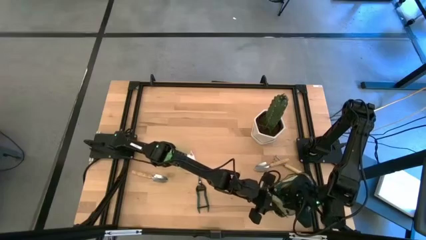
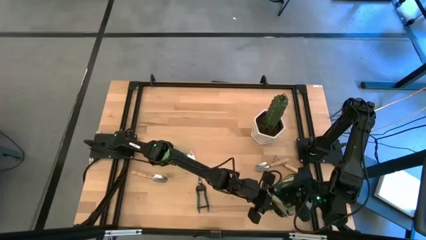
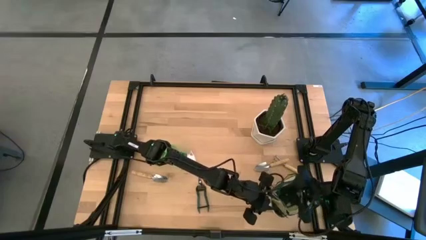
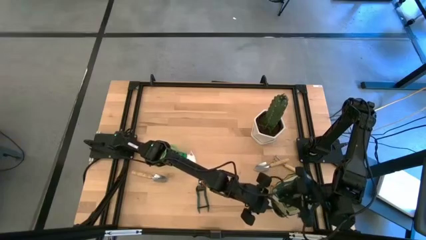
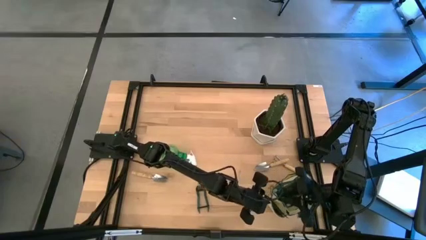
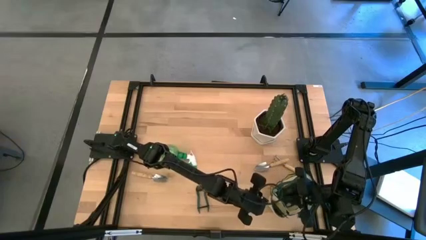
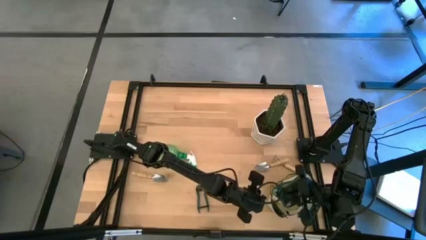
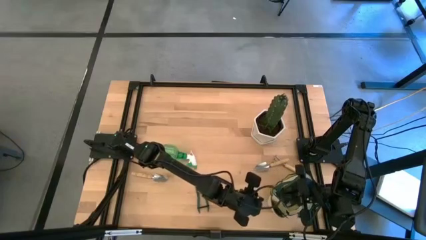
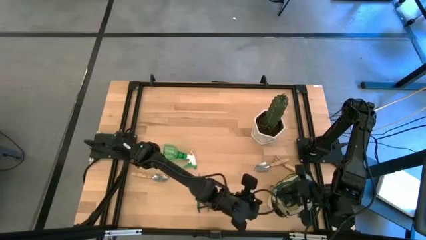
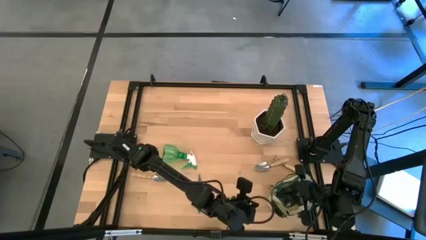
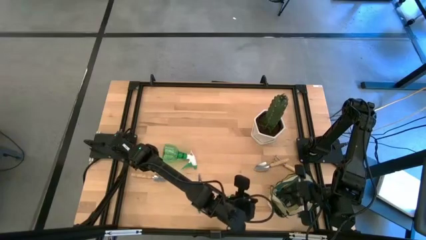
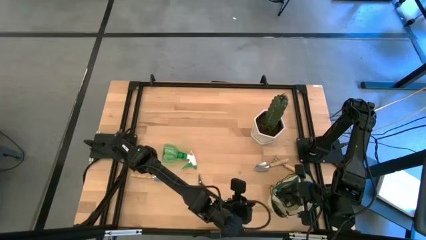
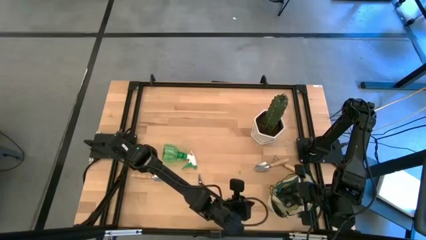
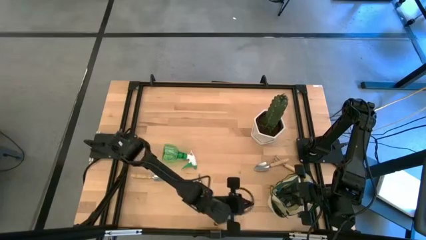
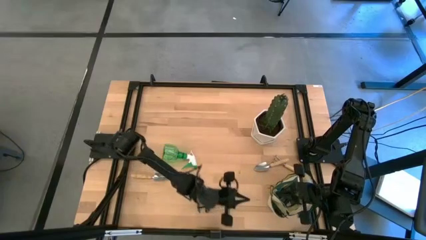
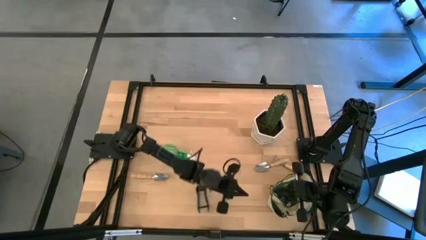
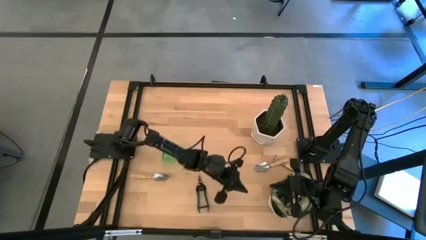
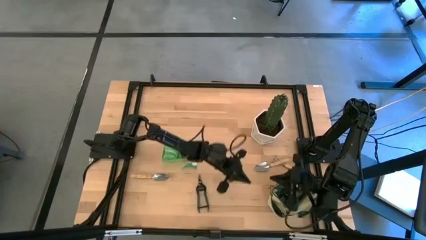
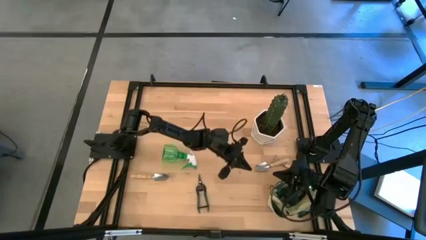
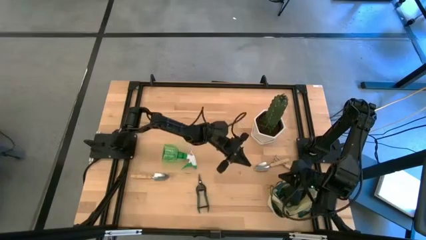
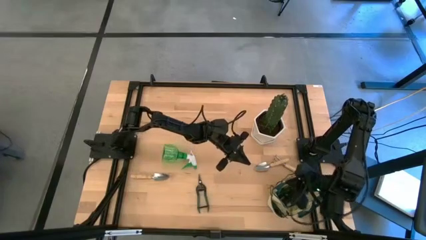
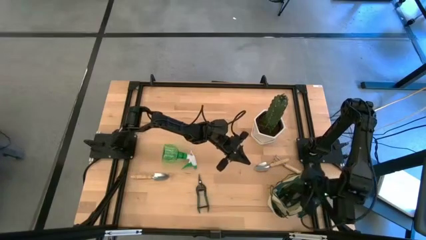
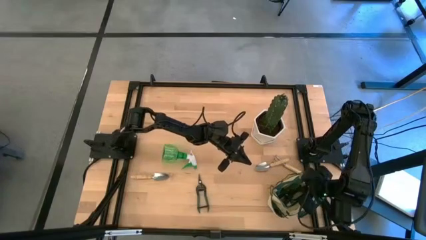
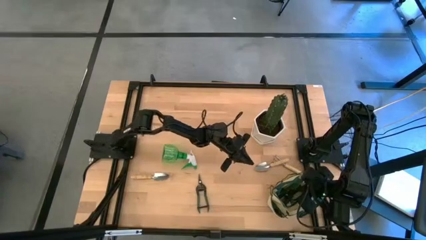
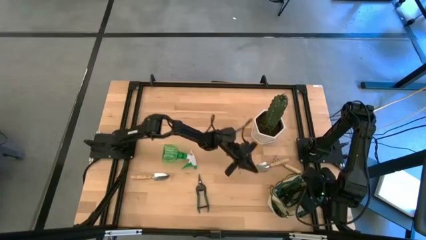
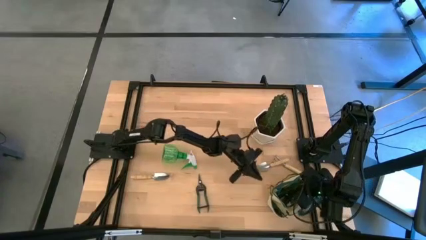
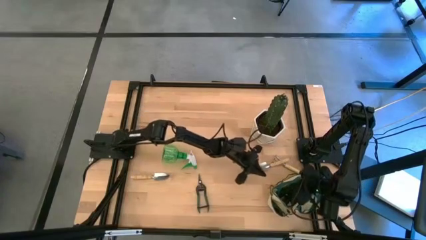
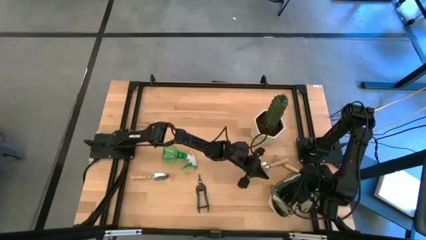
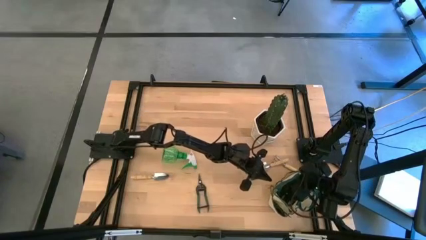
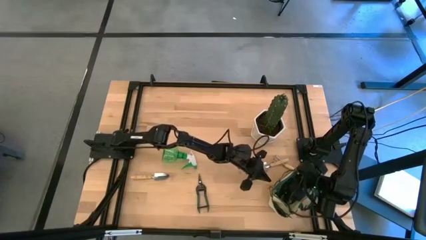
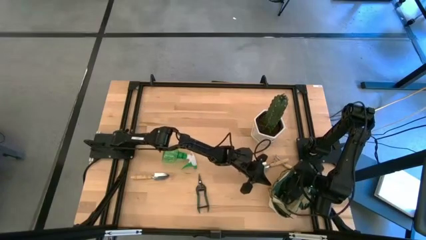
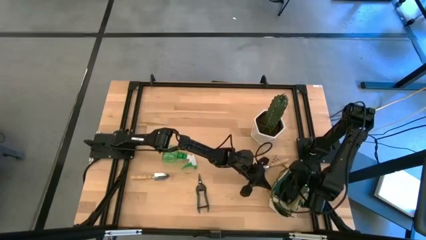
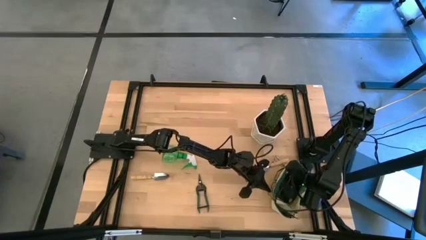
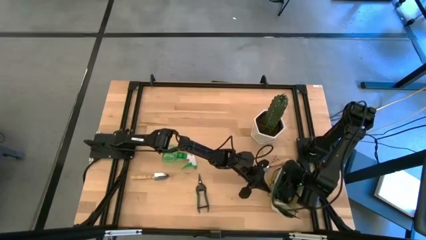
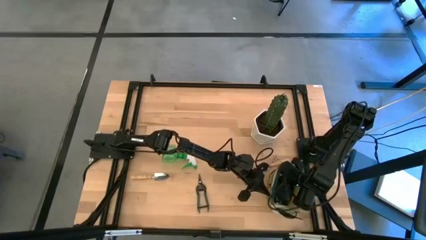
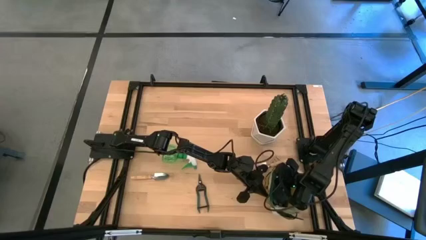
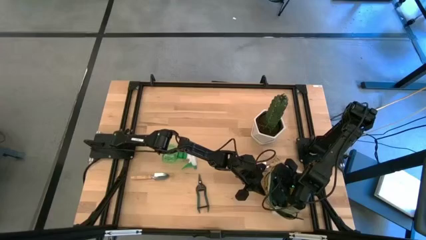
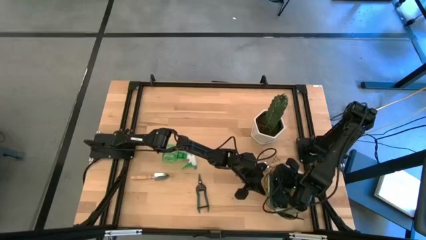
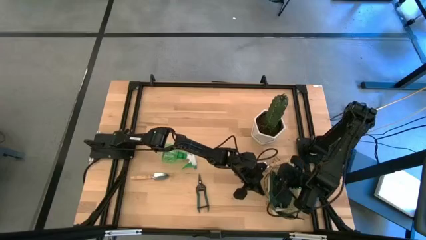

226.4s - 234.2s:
Task: Pick & Place Garden tools in Gardening bag
Adjust the white bag

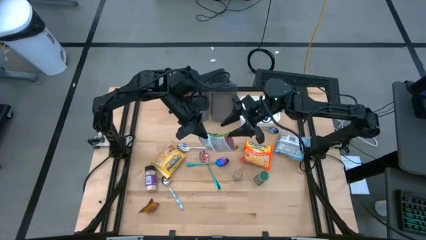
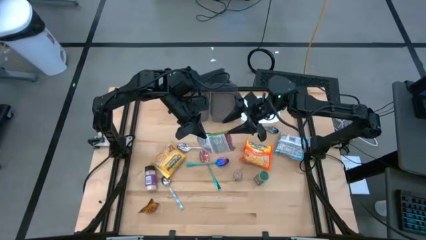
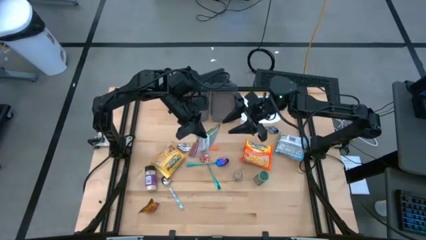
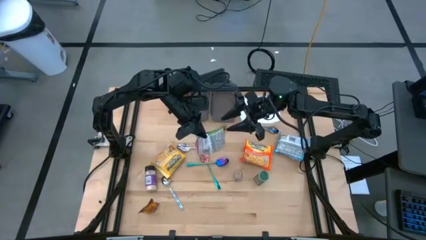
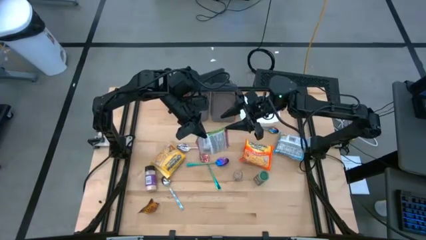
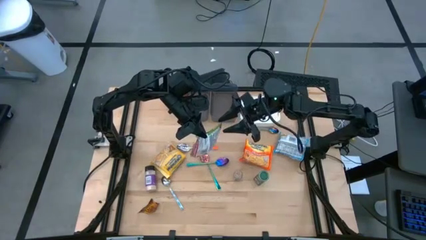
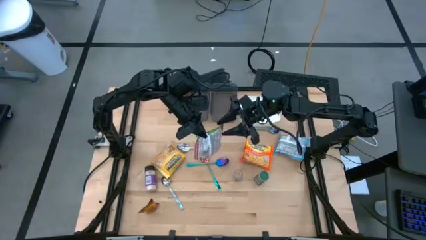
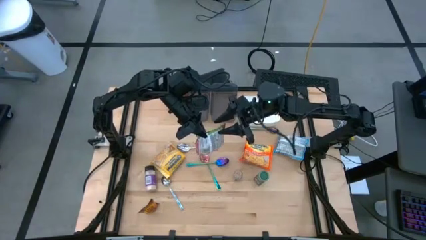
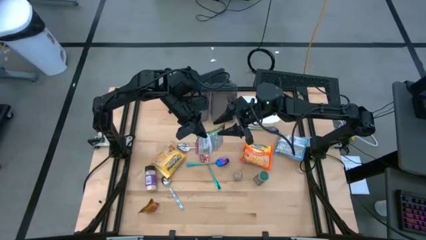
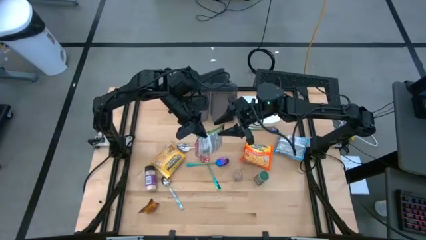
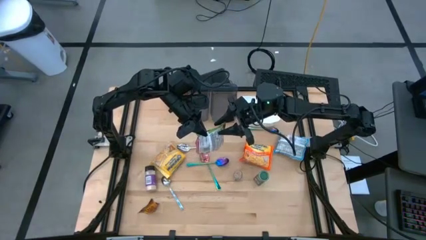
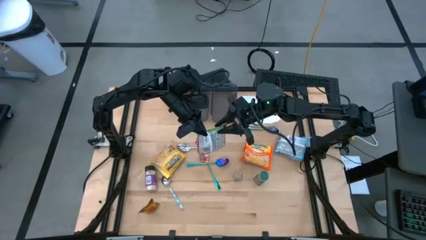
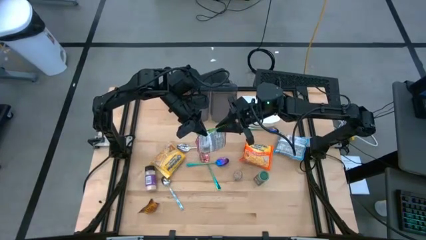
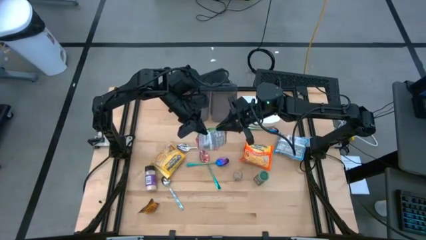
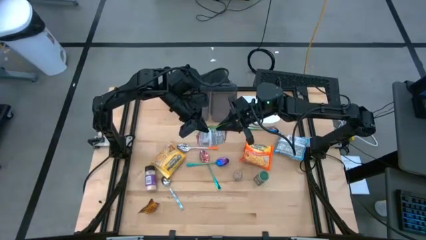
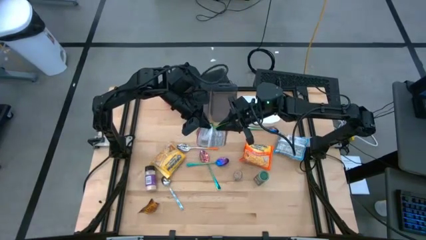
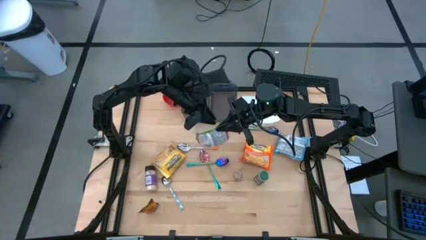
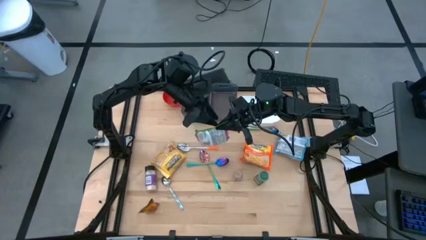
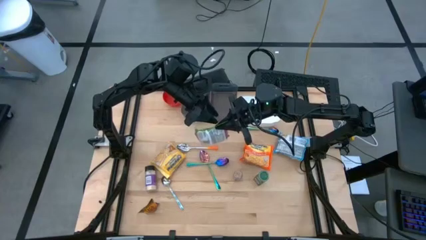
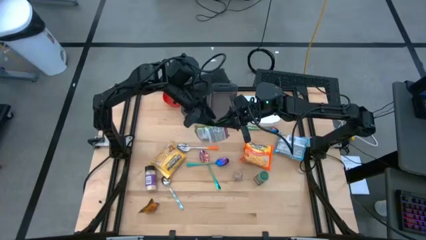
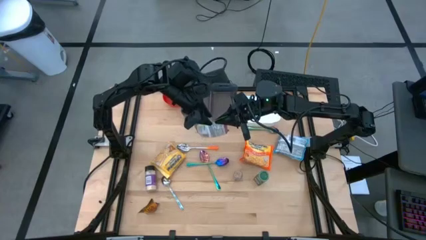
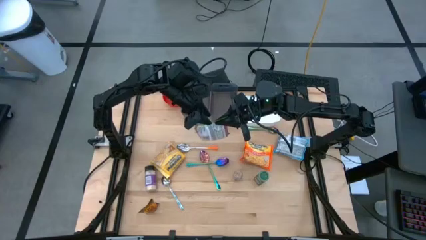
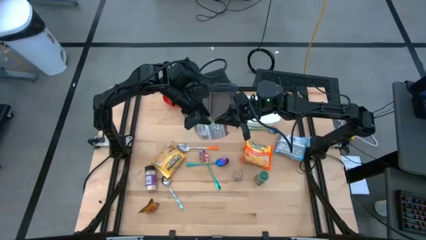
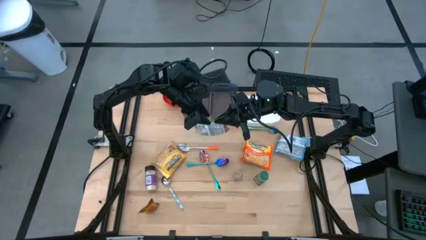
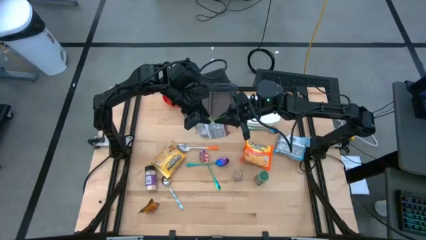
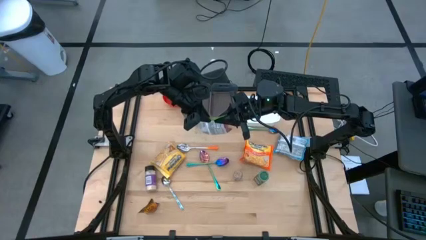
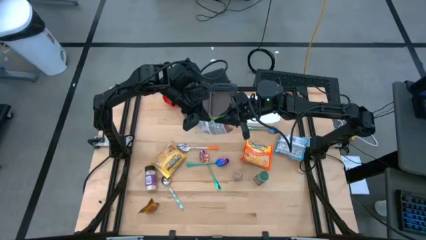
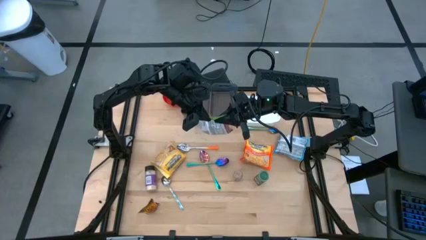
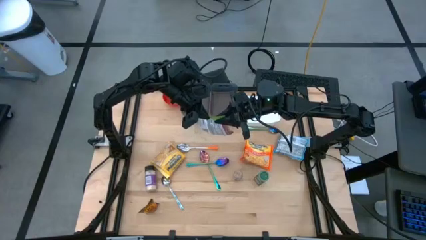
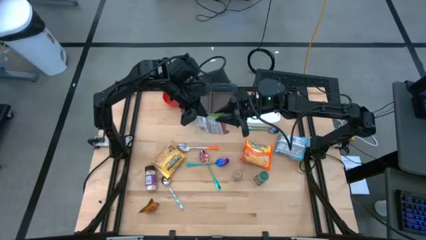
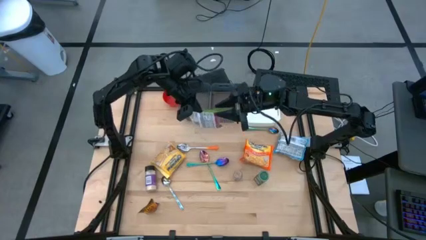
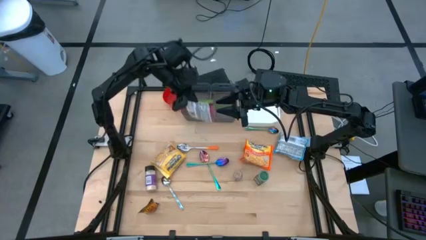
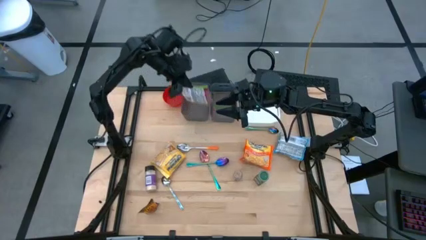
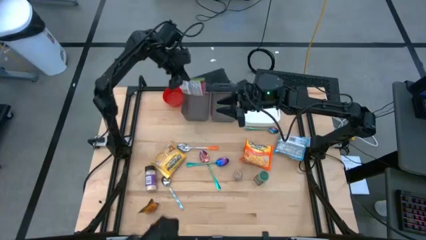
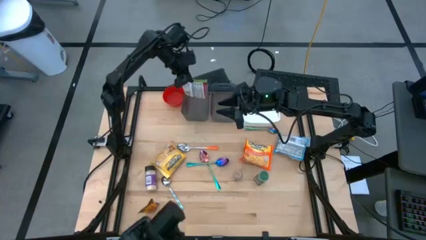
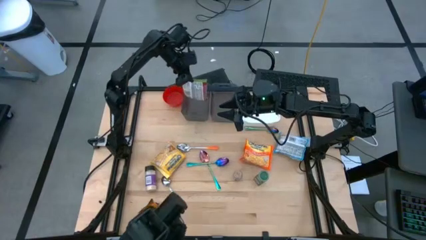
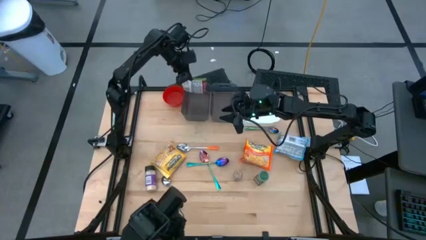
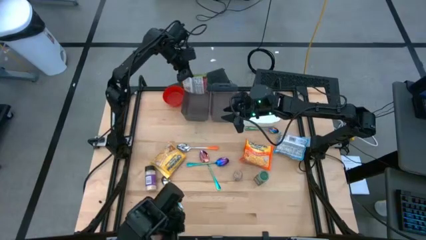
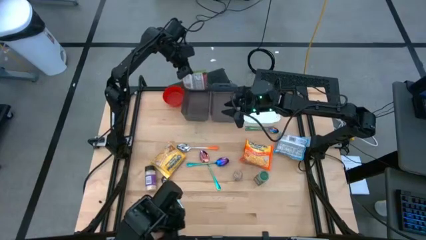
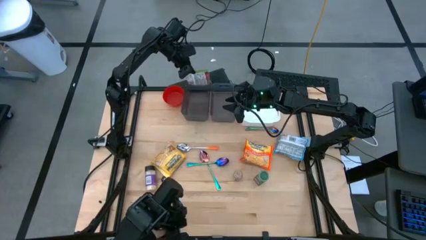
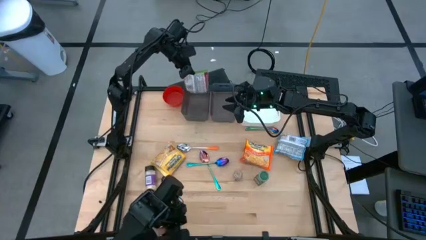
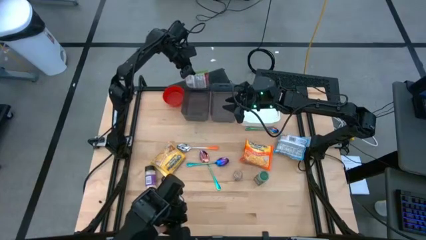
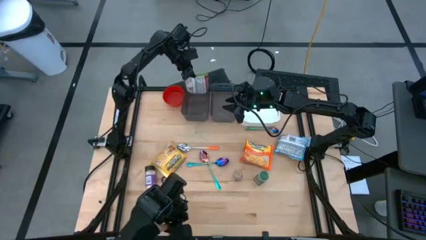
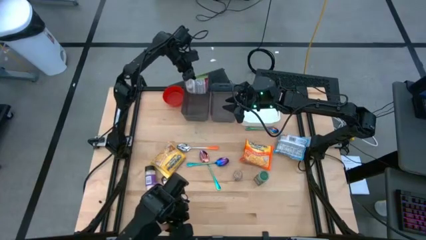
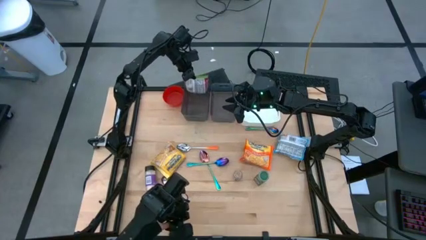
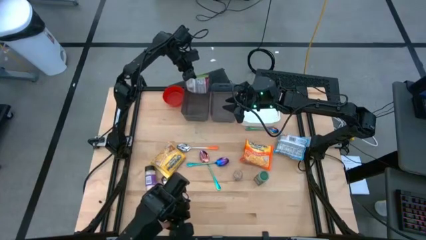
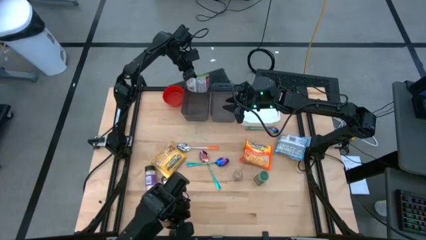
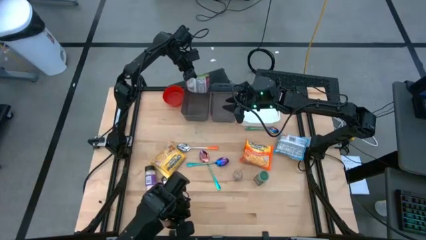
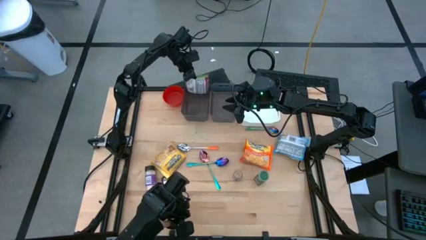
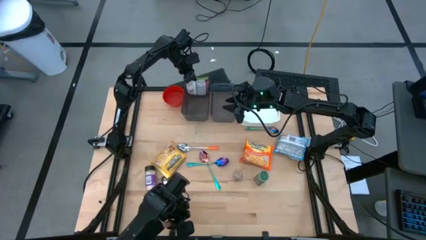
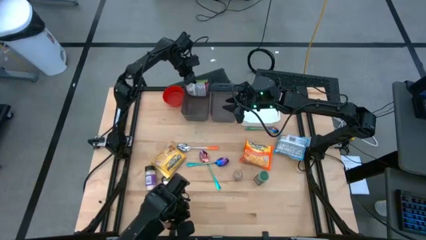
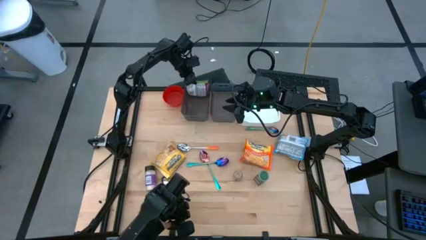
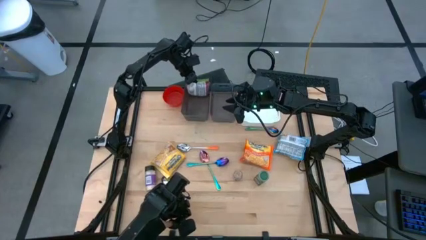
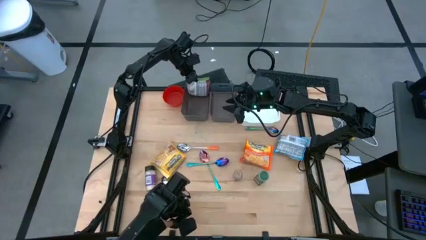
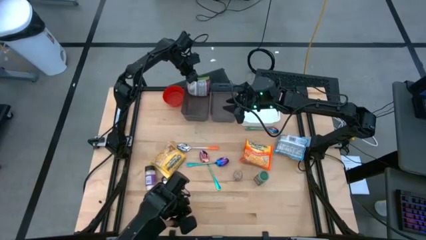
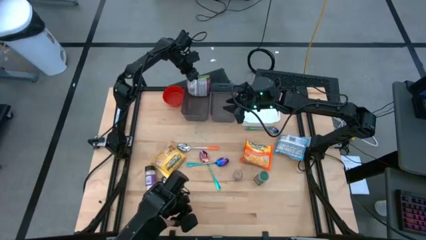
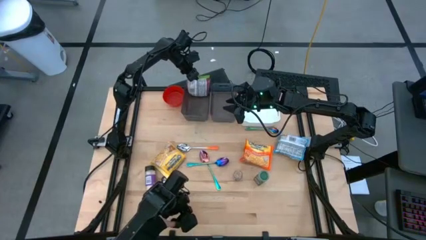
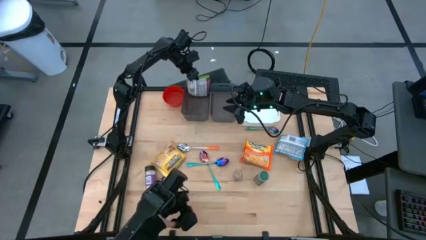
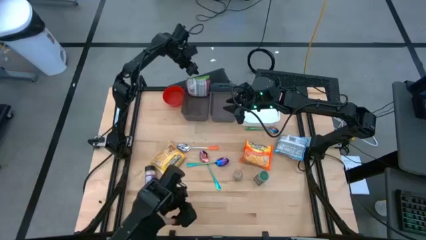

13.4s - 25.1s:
Task: Pick & Place Food Item
Put the green noodle pack into the left black bin
